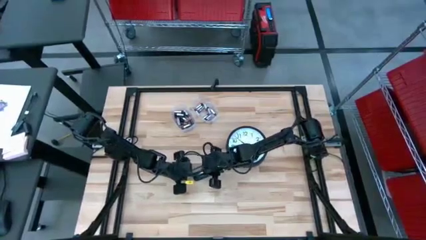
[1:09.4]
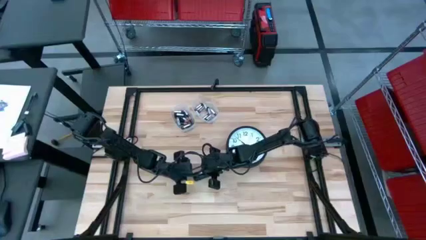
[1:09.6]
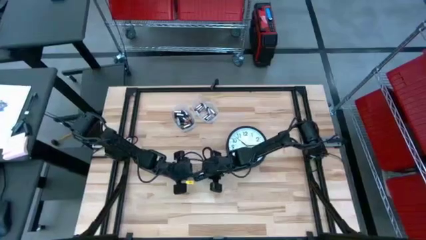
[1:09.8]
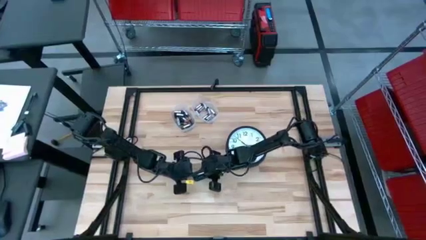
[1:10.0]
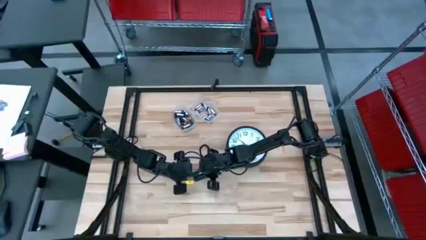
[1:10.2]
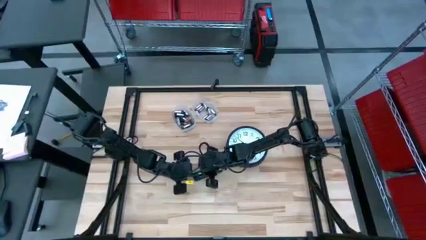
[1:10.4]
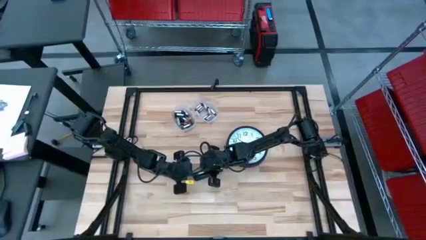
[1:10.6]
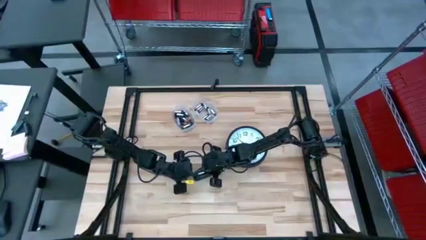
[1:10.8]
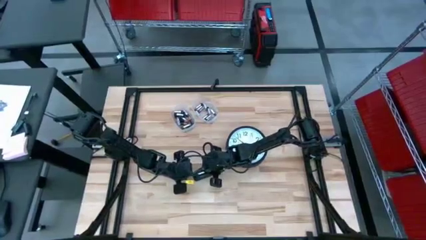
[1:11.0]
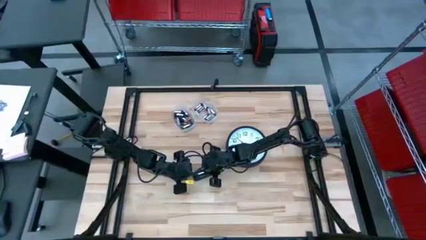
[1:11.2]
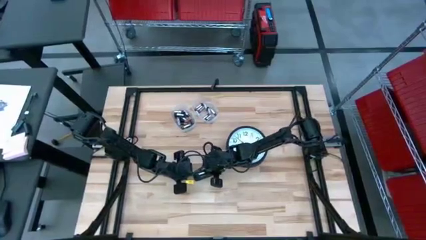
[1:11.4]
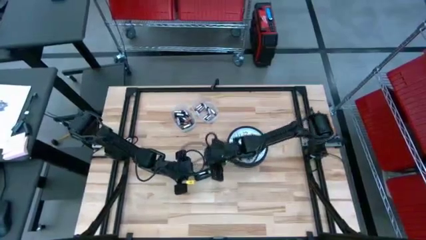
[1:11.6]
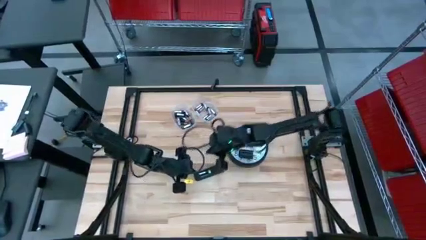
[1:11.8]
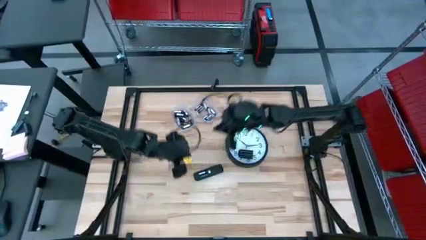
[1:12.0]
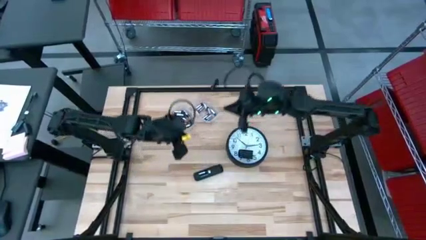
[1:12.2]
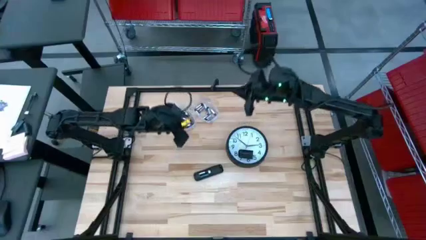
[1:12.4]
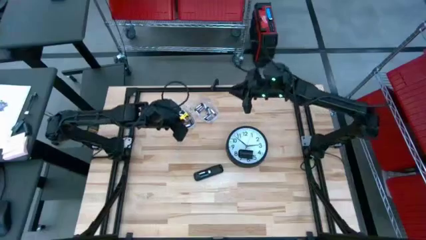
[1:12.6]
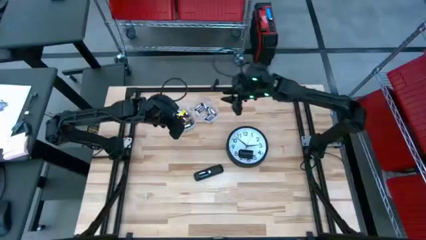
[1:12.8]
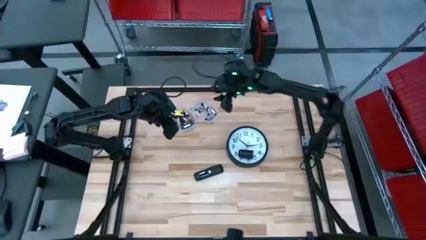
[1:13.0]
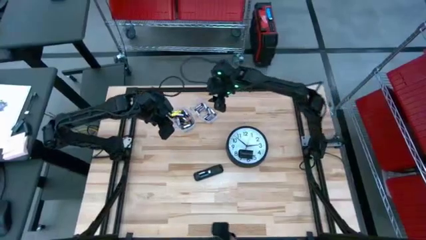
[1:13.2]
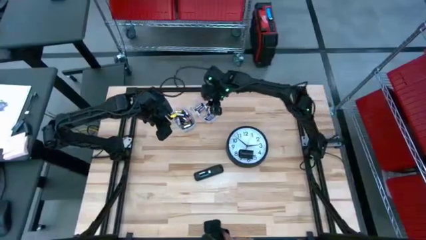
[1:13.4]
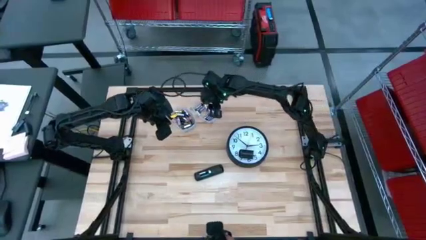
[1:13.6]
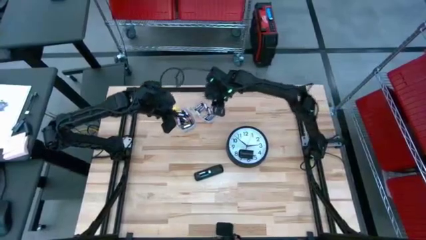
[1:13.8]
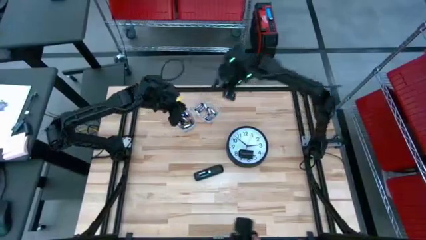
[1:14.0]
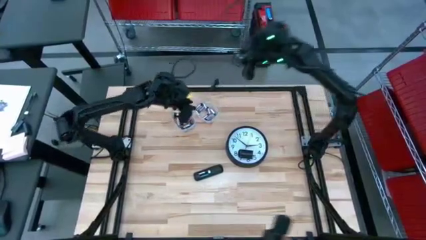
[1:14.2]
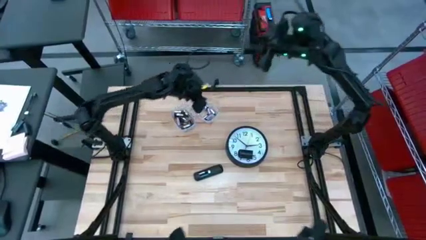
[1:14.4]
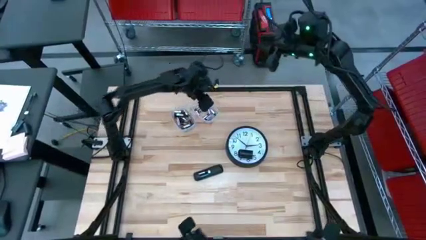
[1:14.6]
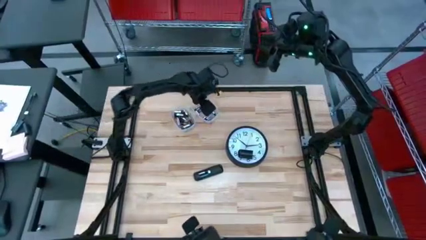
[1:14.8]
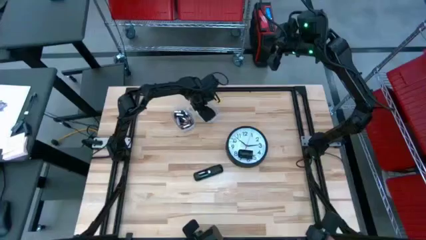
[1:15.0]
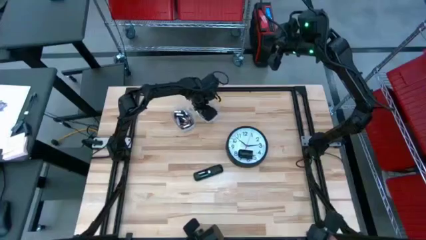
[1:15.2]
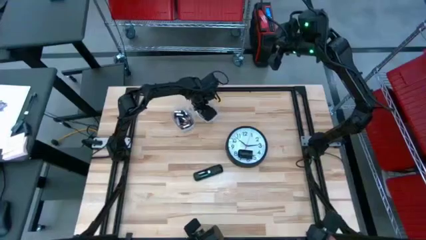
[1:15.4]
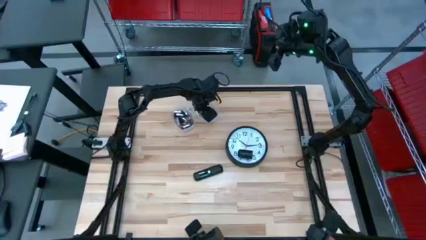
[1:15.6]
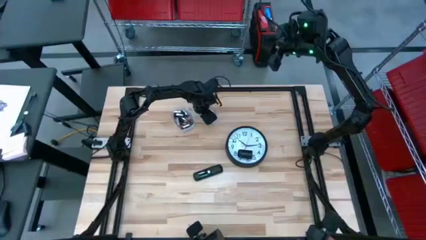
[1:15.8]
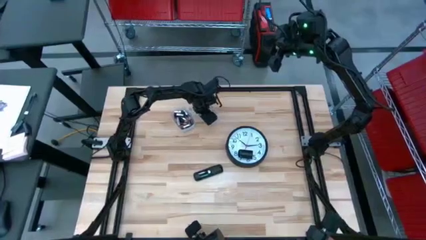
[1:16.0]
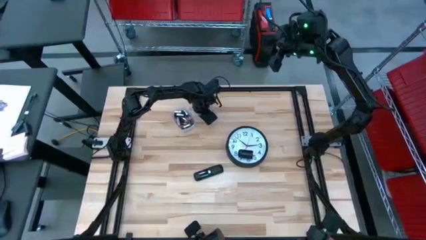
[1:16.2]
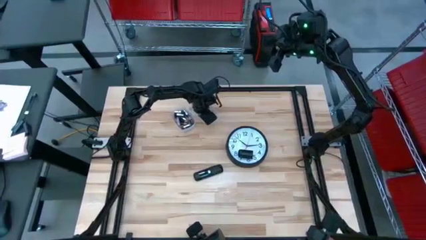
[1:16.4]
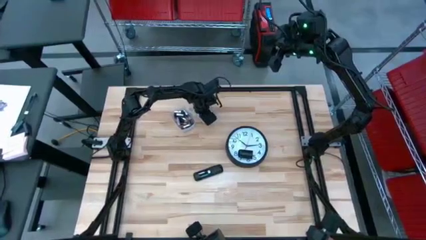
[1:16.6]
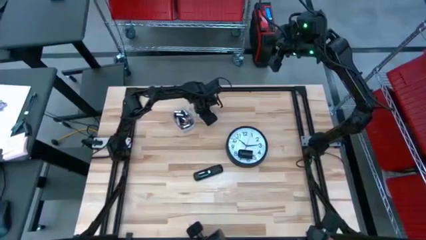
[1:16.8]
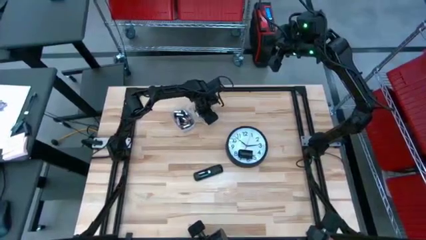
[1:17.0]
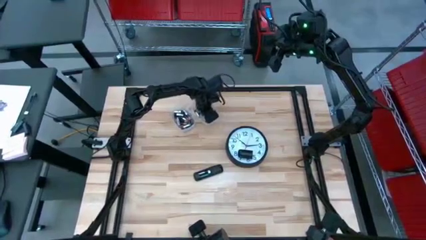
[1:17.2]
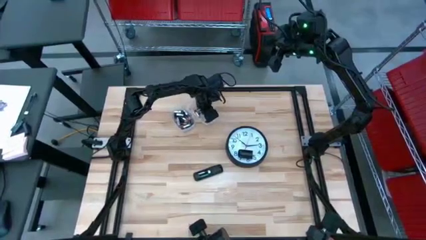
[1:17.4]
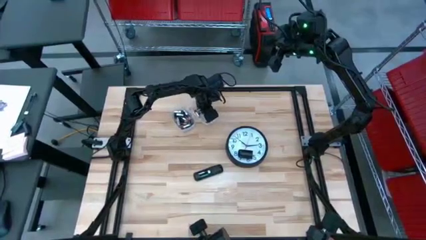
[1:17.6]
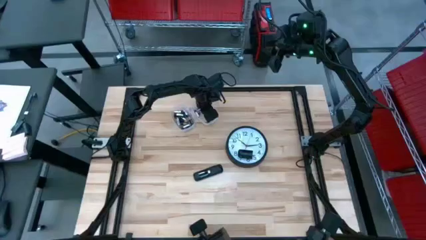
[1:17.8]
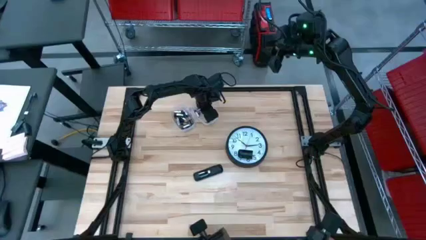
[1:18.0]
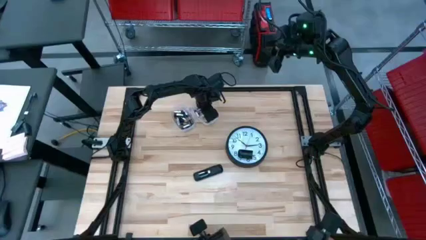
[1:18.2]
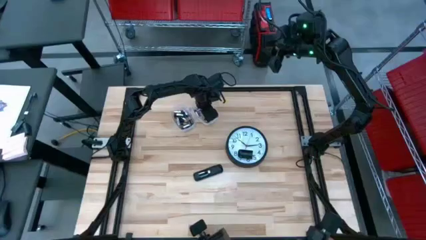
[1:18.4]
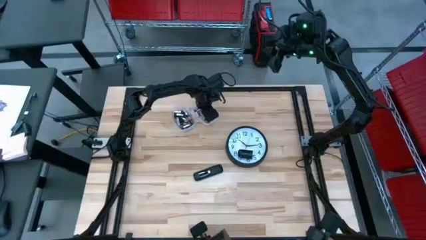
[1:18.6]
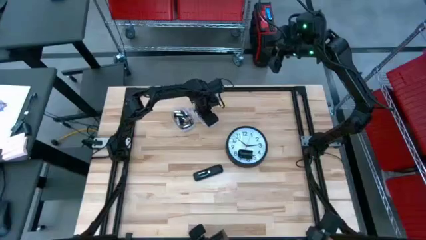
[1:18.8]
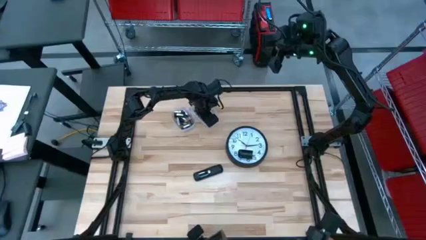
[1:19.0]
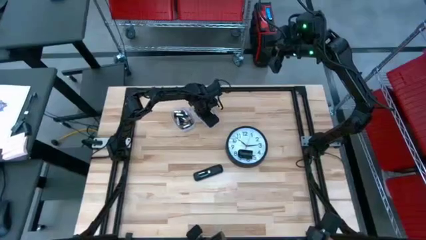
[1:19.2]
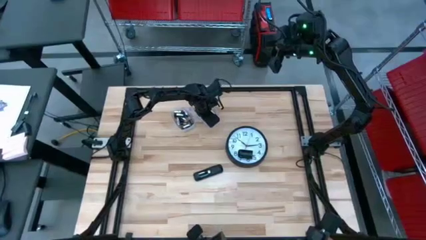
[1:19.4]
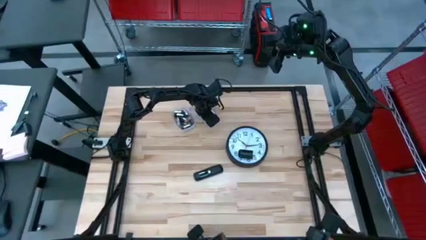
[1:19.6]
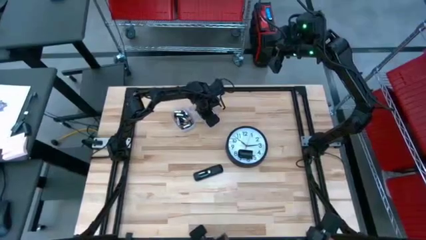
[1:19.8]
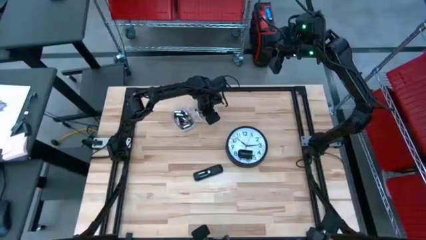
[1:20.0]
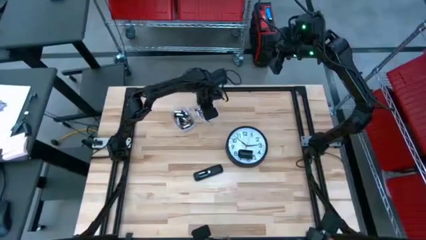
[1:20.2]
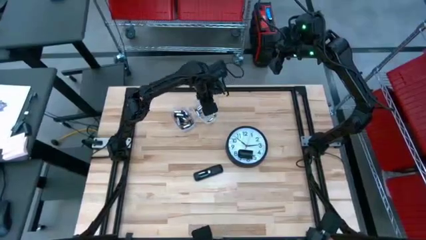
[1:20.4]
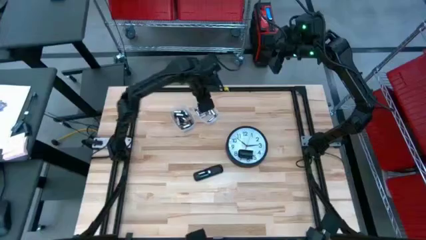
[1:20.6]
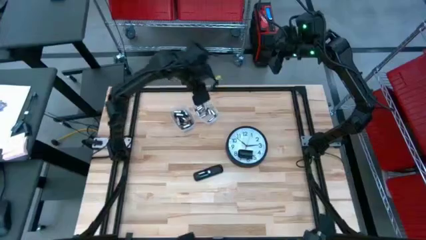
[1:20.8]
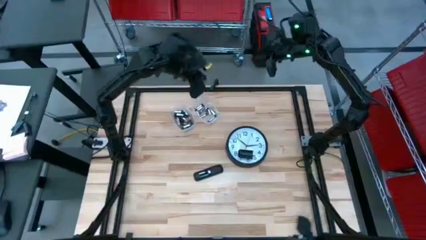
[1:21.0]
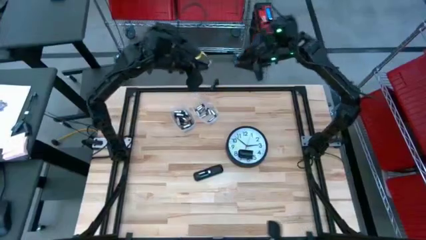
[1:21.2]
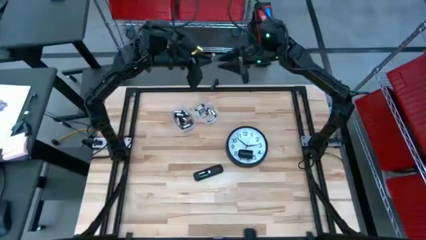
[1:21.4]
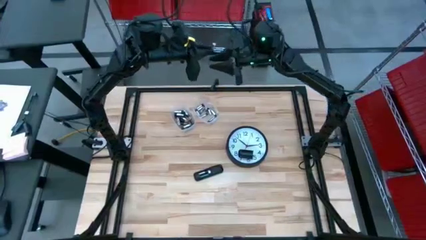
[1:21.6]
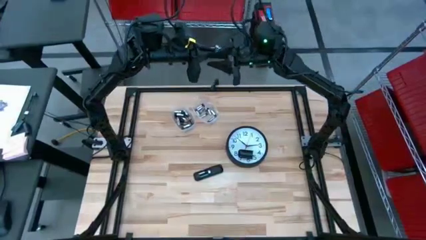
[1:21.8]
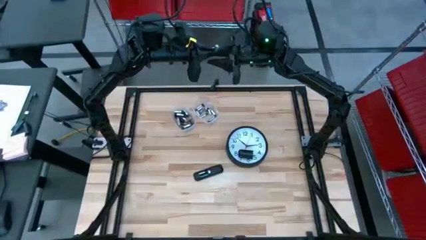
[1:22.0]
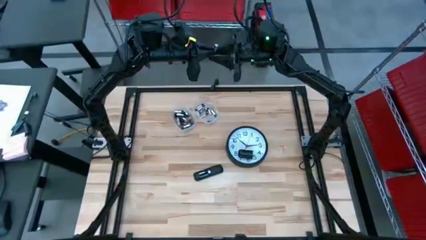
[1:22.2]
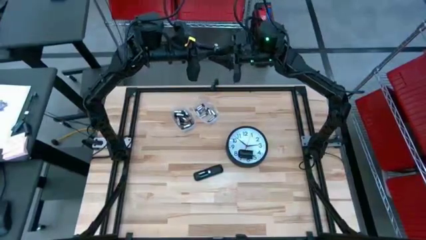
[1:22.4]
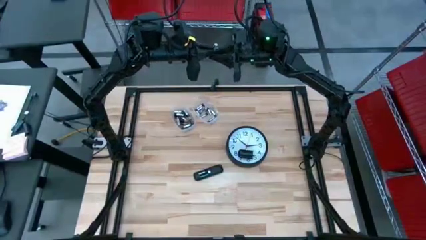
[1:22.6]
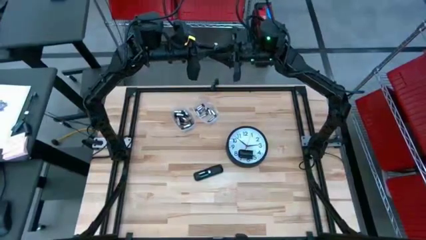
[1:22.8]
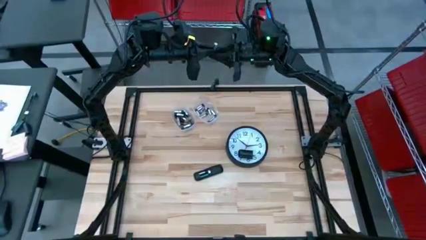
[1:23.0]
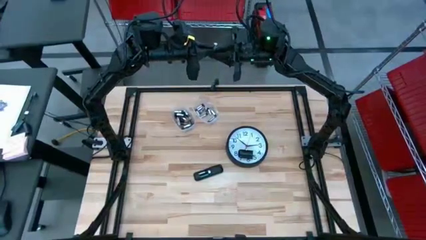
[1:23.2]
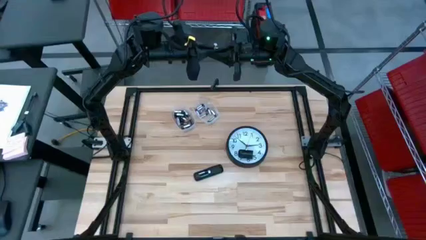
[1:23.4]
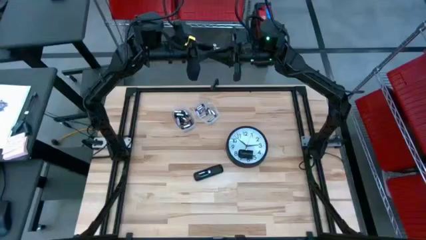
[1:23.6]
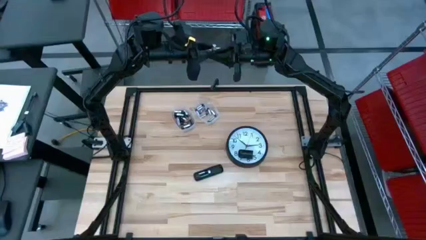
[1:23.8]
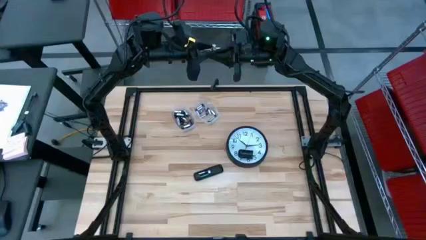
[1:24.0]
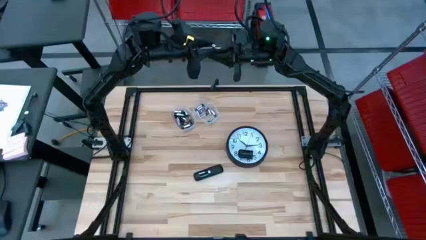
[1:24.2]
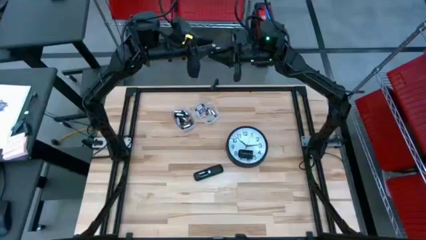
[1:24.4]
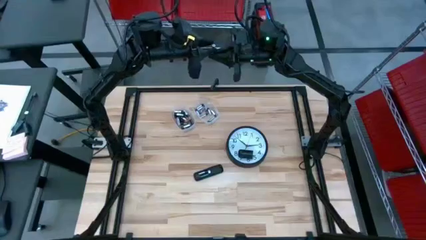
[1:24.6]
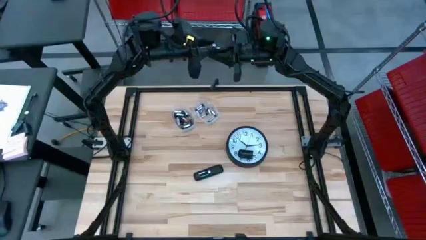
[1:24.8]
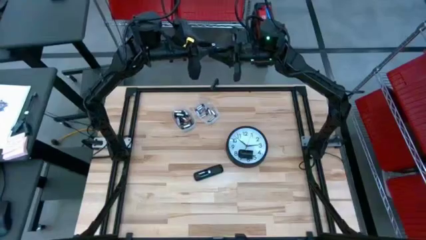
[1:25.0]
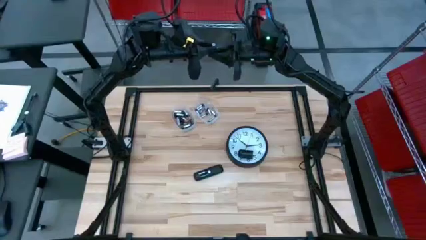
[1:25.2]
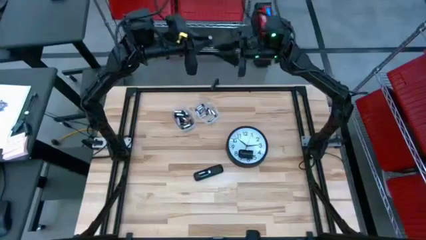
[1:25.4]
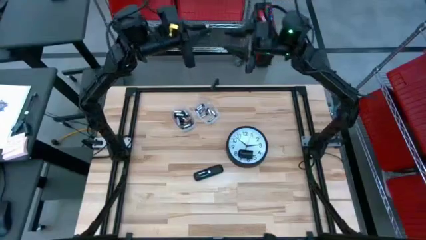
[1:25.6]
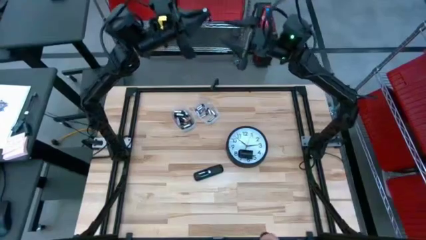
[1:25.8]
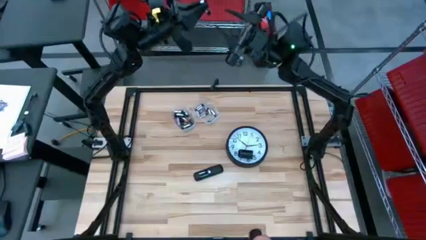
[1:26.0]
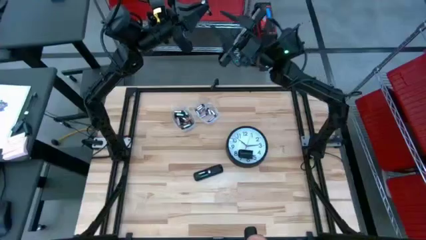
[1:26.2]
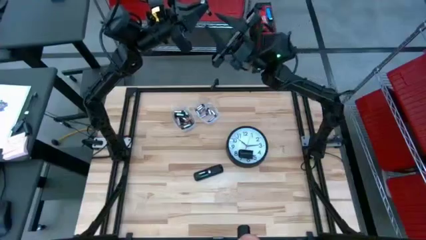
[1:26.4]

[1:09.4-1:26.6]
Task: Insert battery
Insert the silver battery into the remote control
